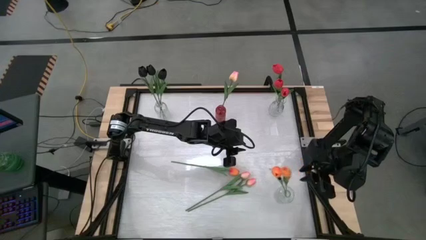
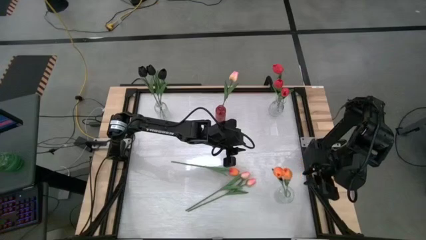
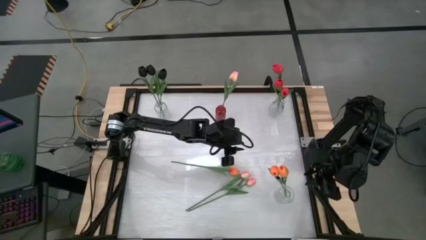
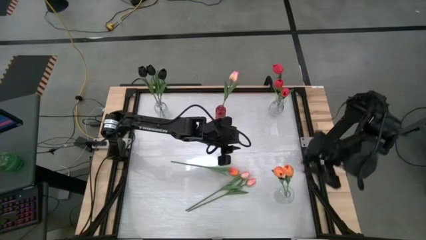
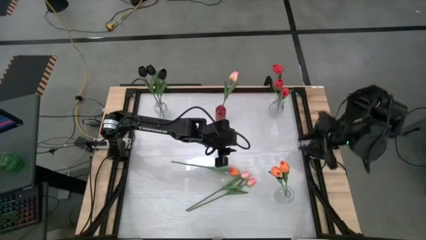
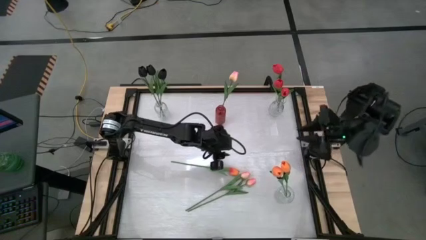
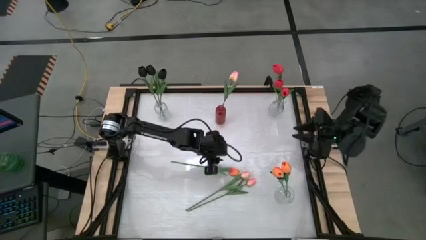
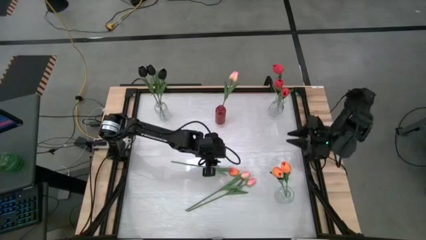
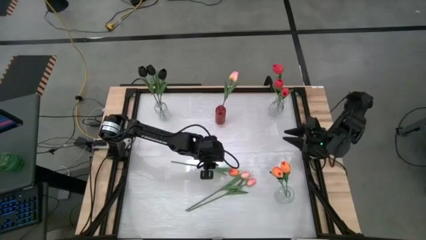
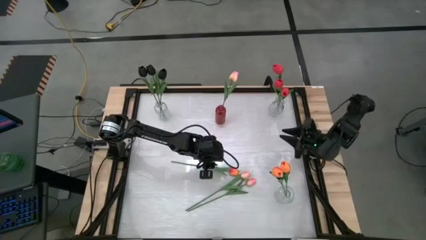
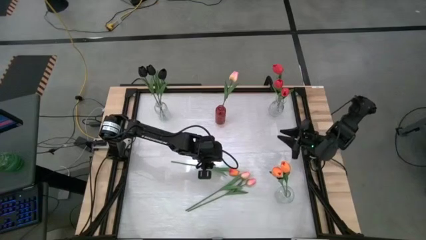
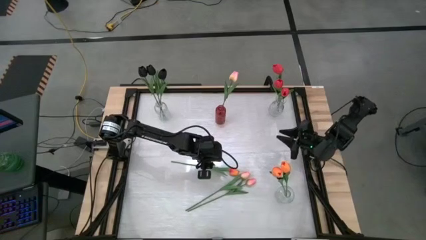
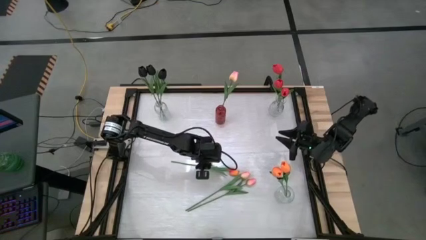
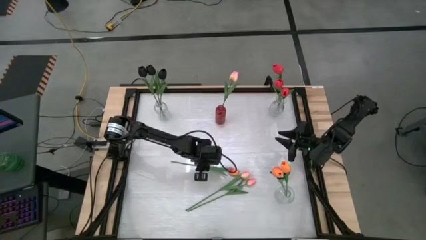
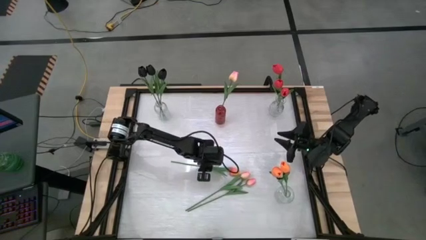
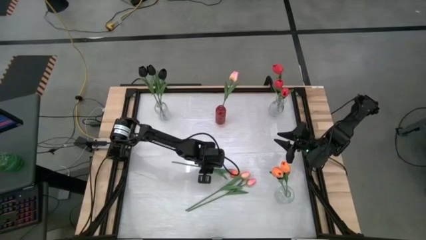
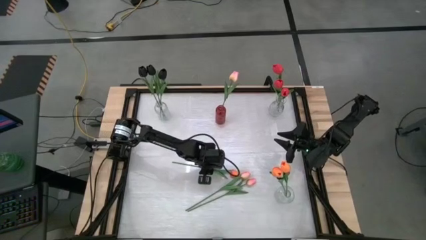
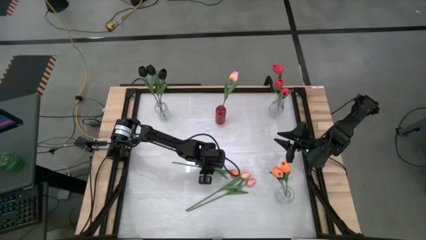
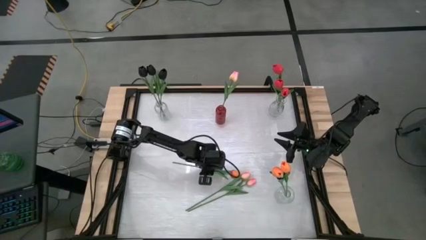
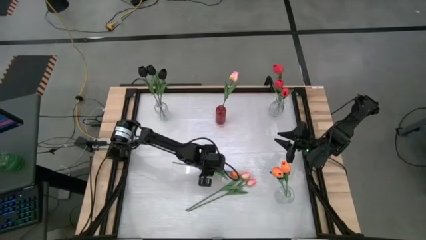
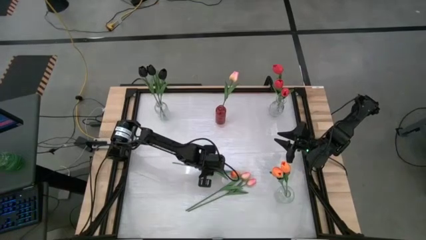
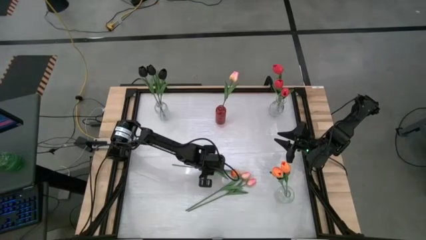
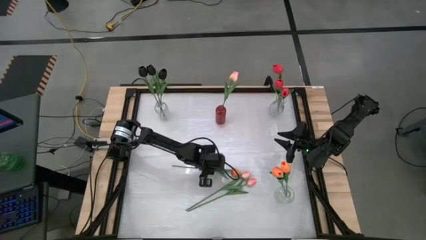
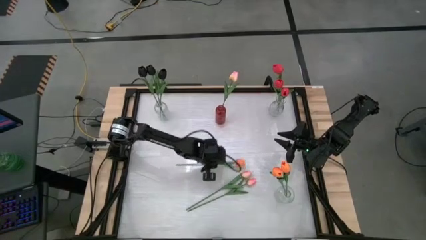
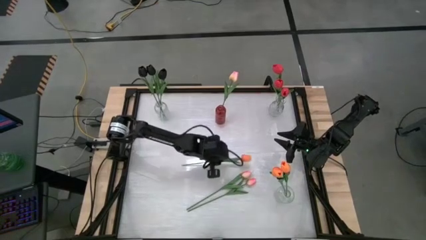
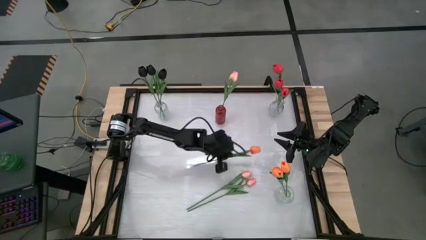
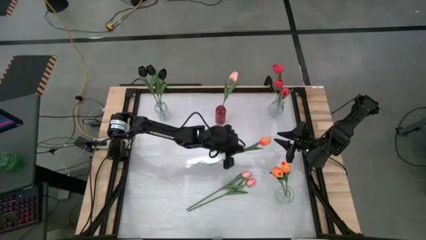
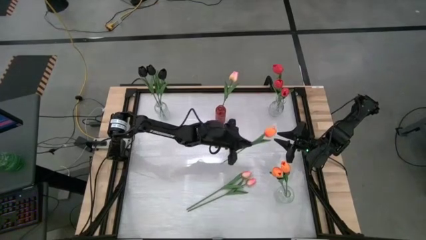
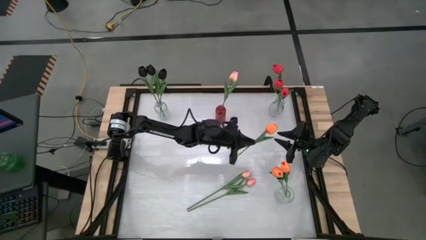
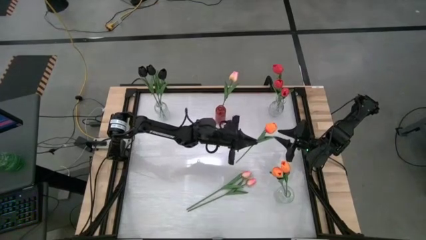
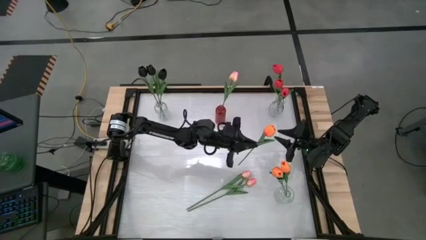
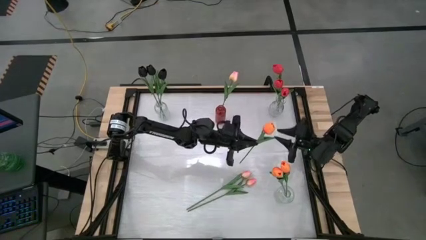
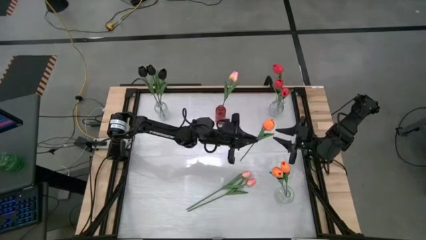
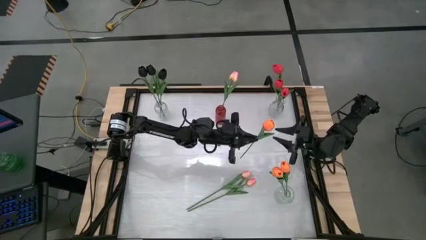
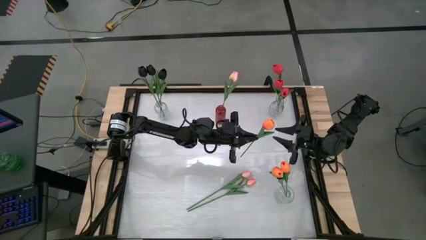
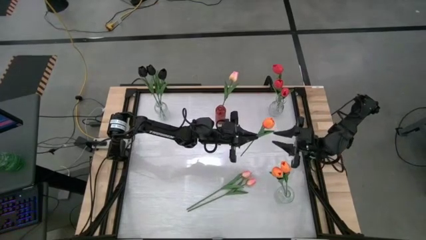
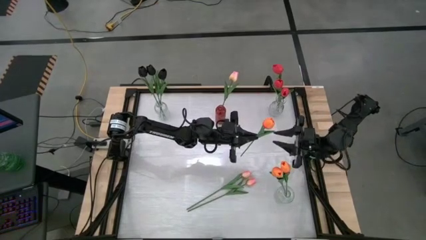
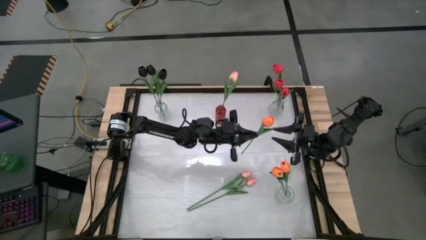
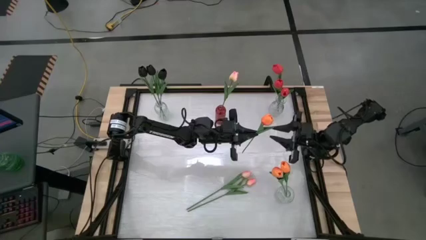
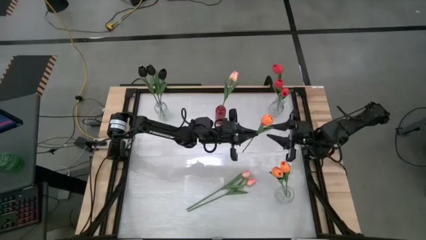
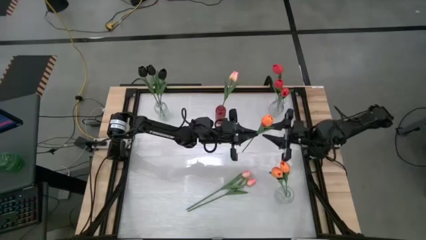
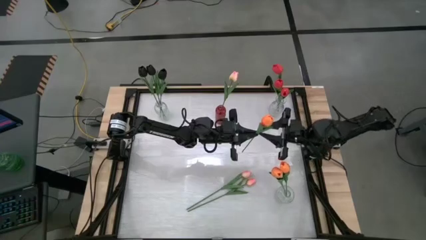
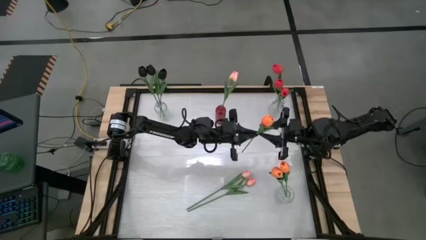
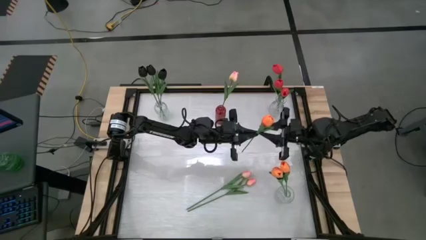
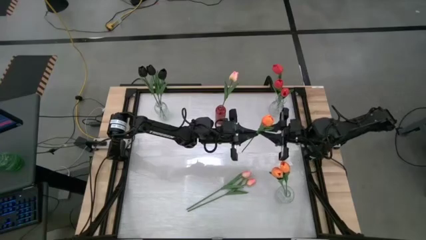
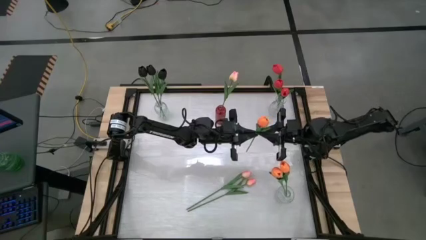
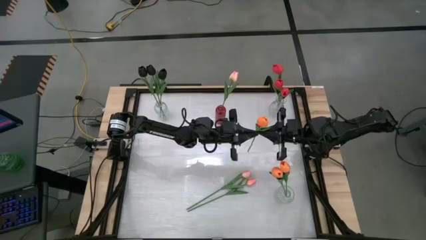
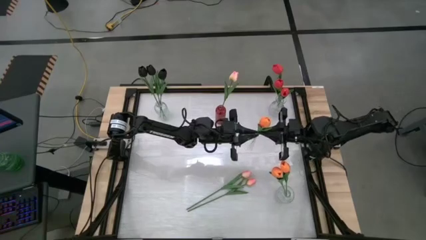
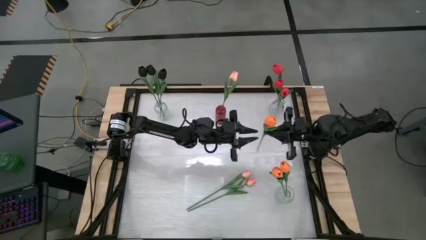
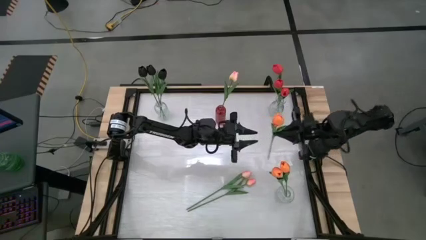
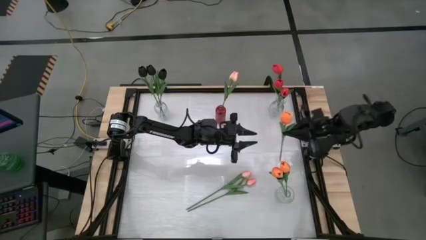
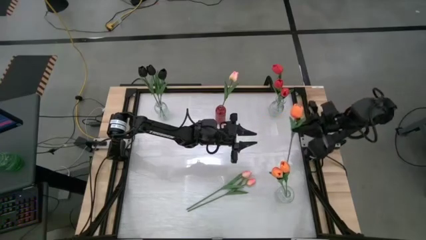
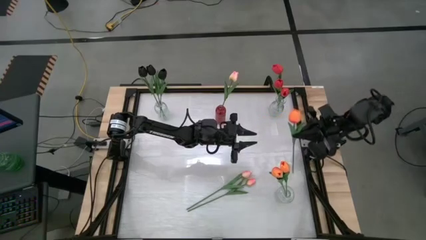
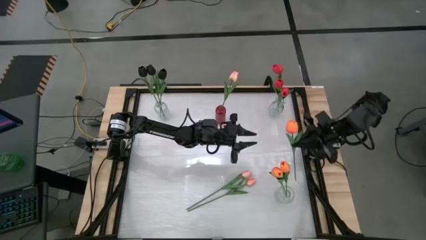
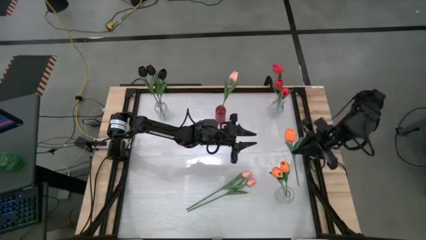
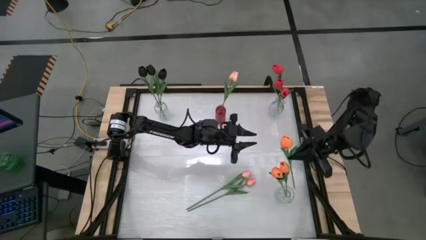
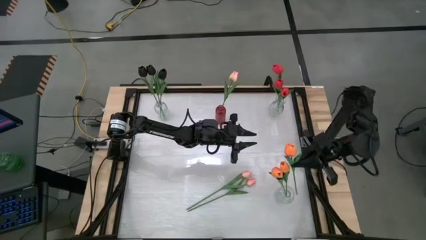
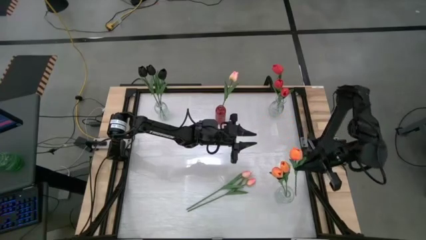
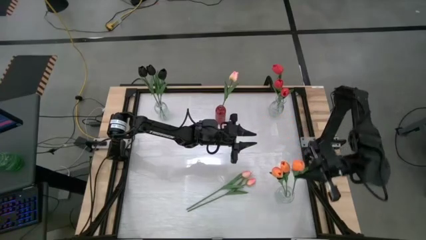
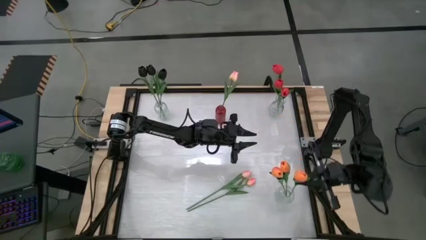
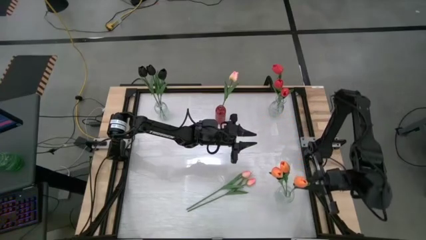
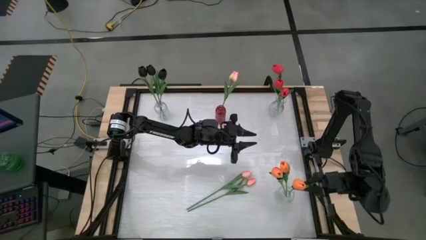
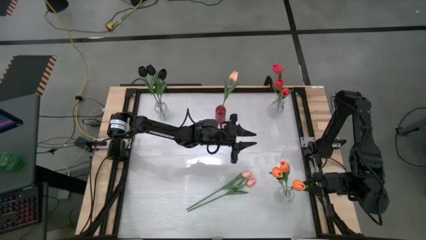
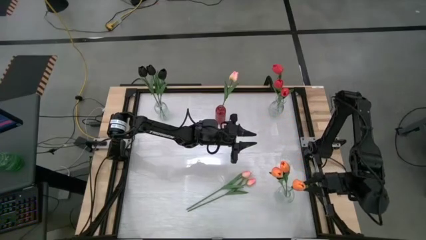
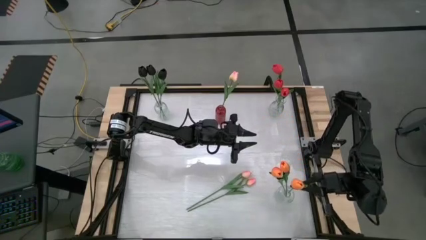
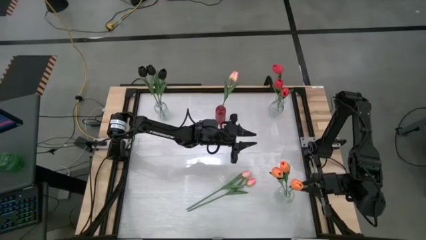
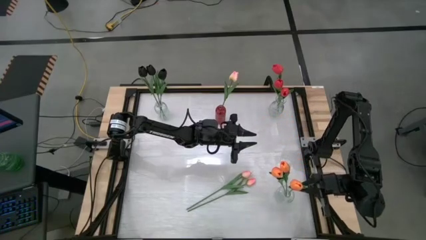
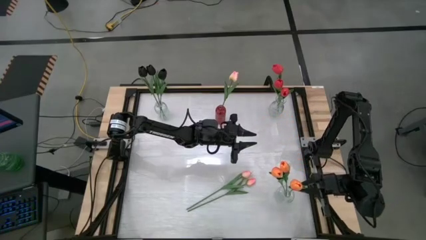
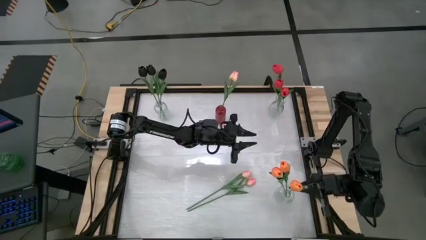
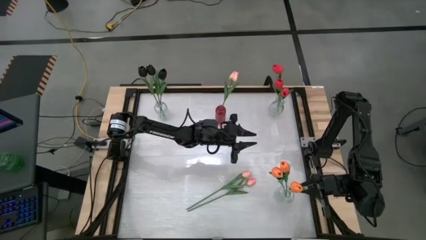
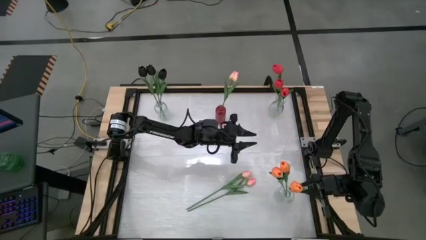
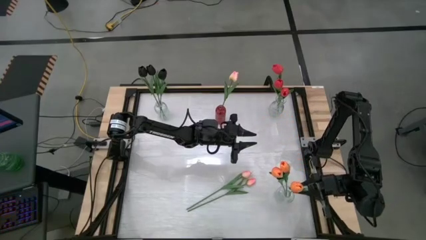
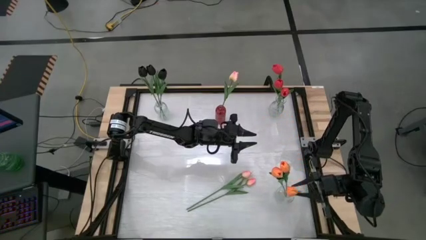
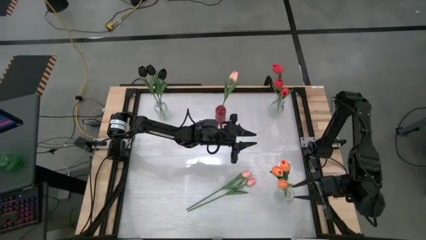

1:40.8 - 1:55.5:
Task: Sort flowers into vase by color
Put the orange flower into the bottom transparent vase
